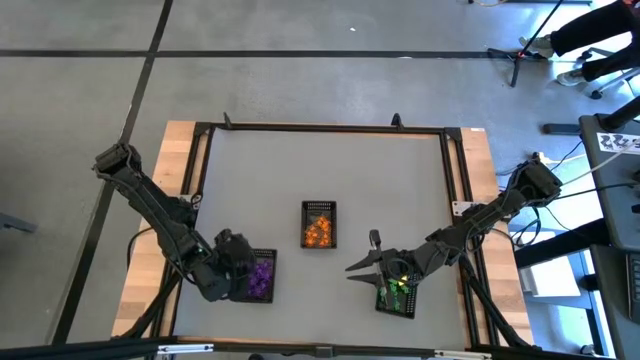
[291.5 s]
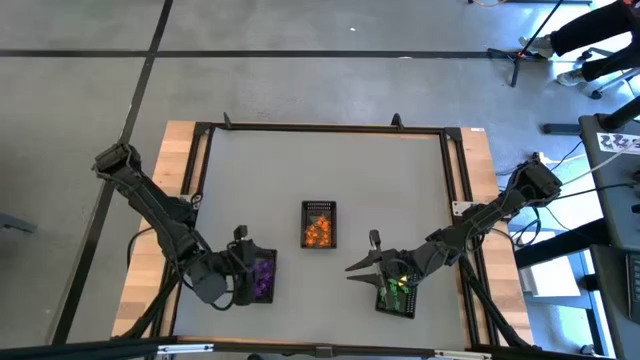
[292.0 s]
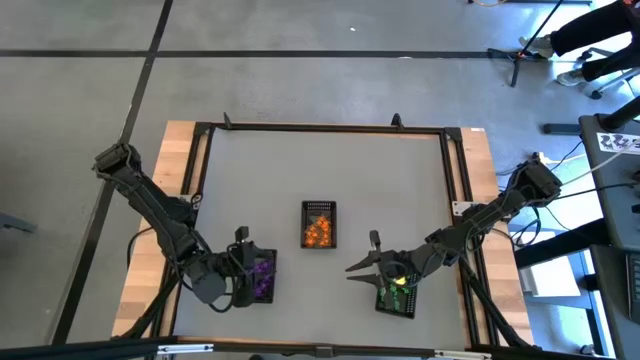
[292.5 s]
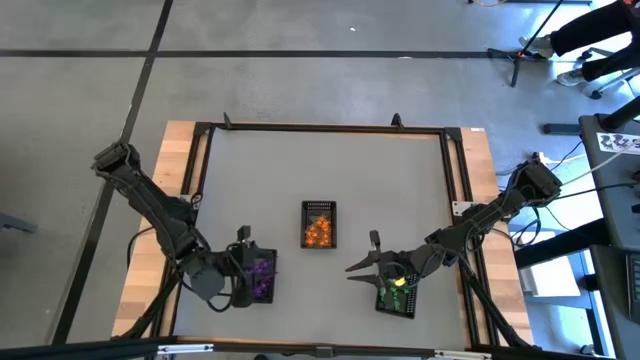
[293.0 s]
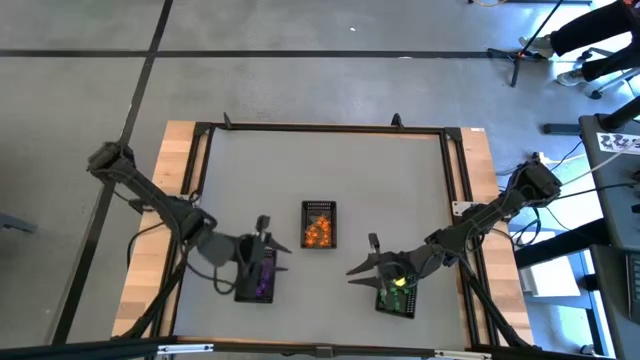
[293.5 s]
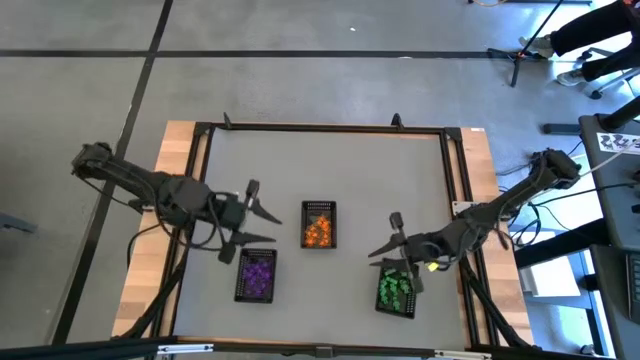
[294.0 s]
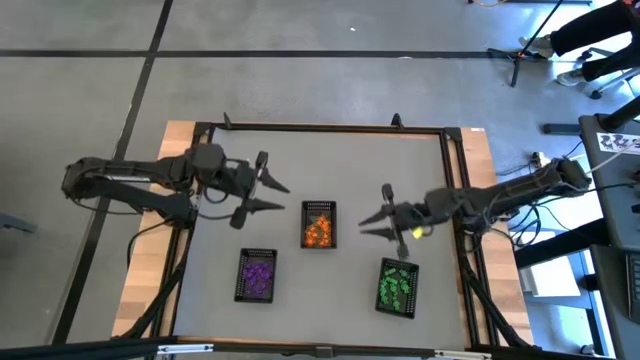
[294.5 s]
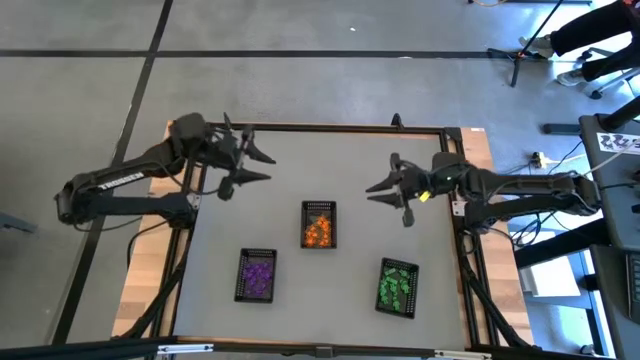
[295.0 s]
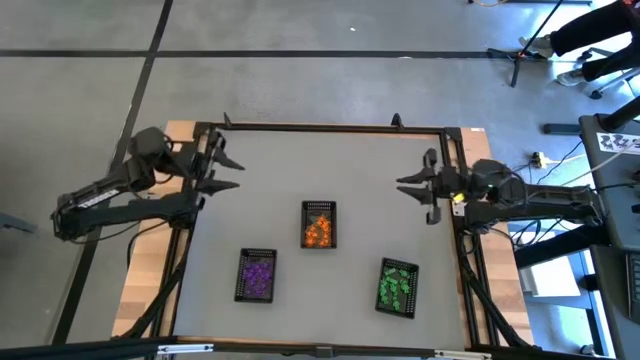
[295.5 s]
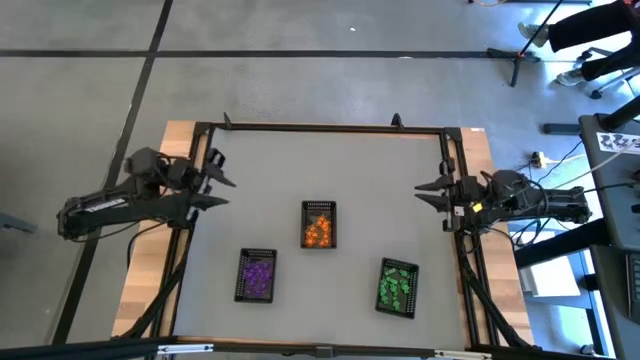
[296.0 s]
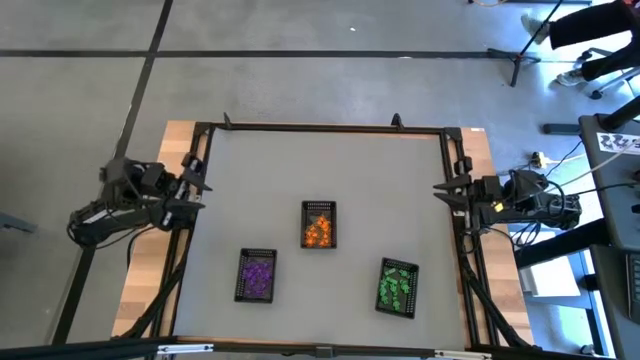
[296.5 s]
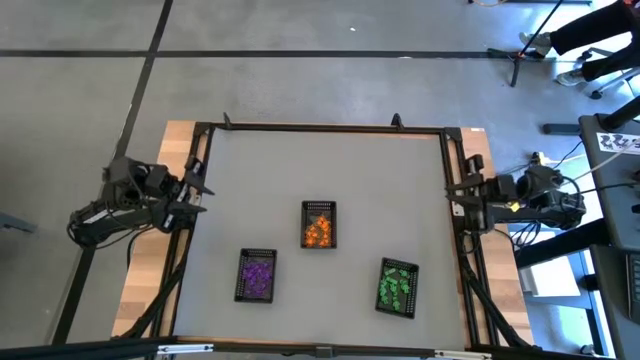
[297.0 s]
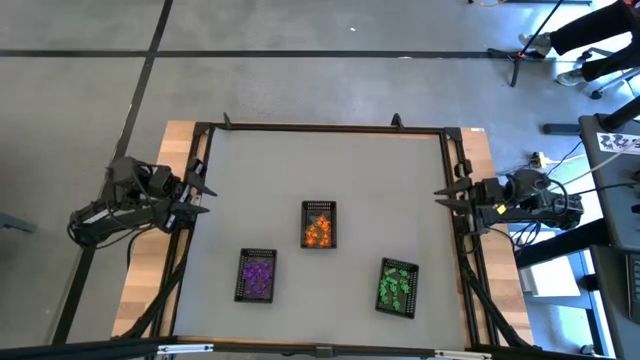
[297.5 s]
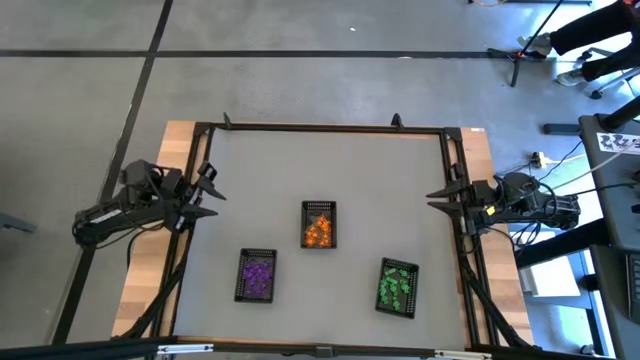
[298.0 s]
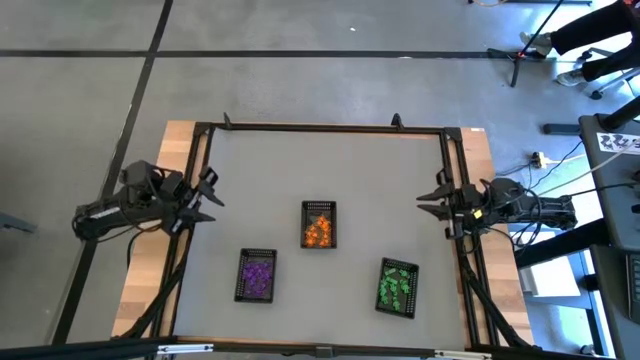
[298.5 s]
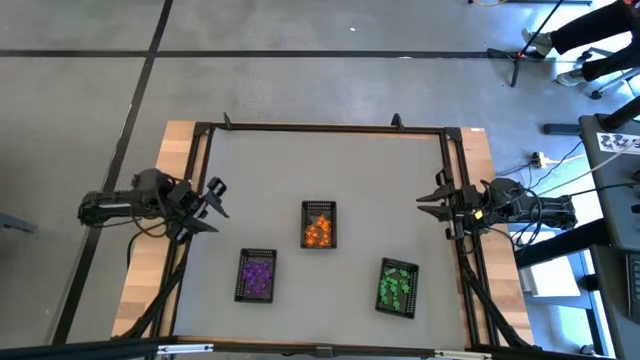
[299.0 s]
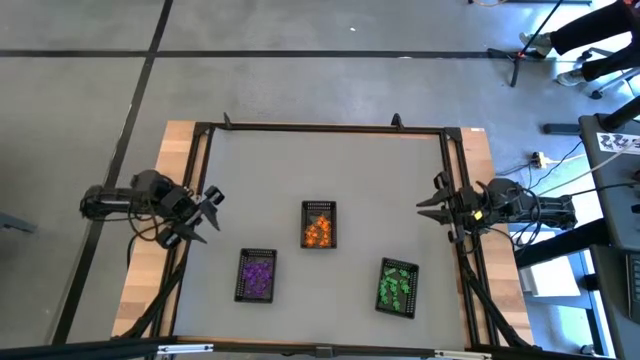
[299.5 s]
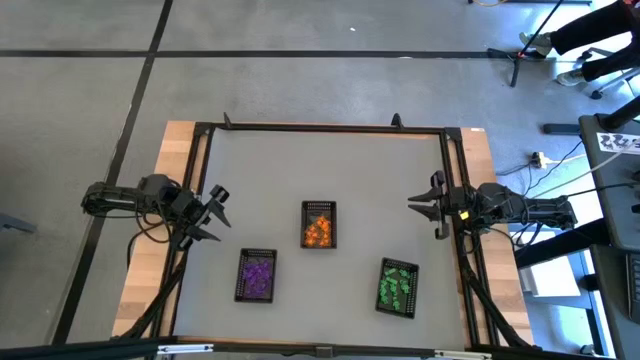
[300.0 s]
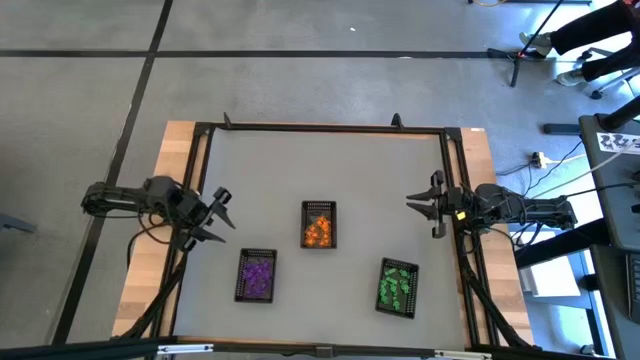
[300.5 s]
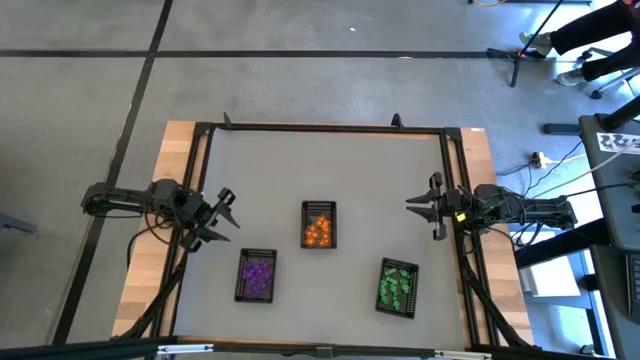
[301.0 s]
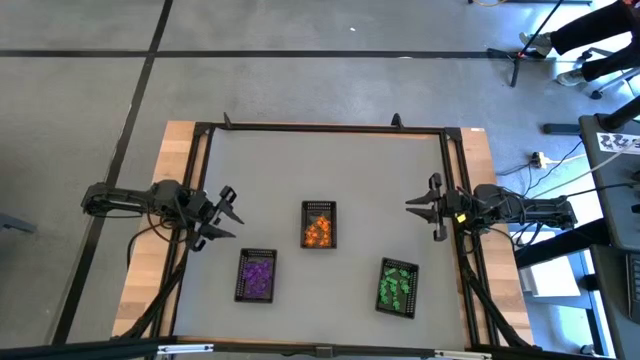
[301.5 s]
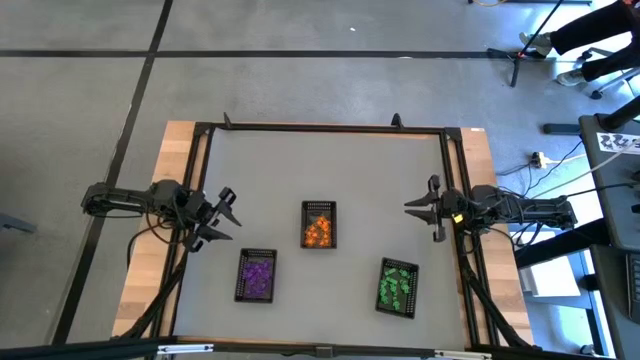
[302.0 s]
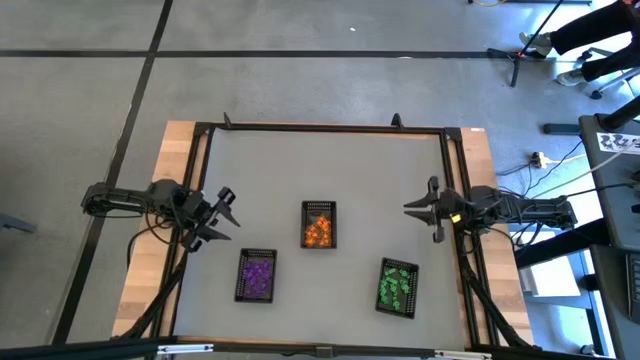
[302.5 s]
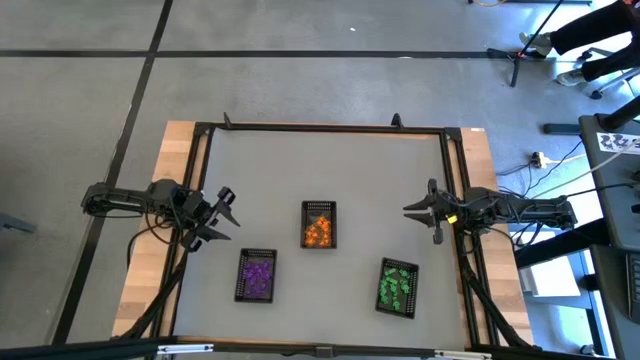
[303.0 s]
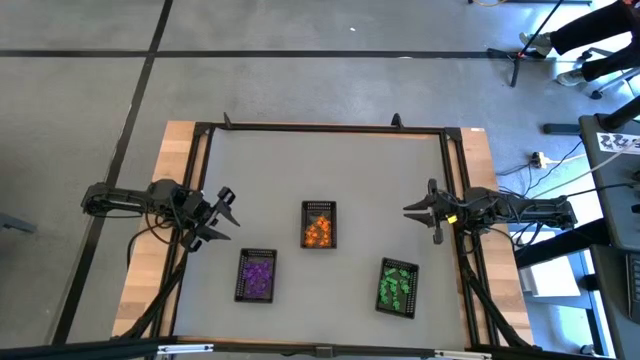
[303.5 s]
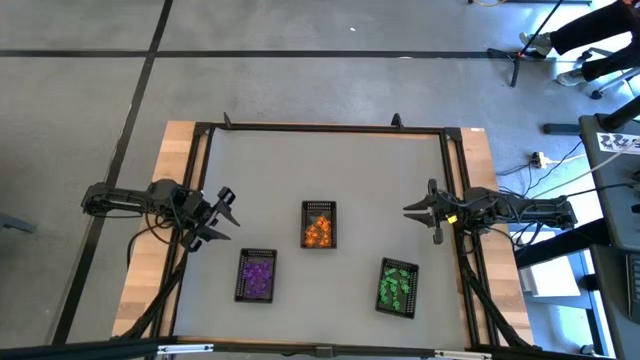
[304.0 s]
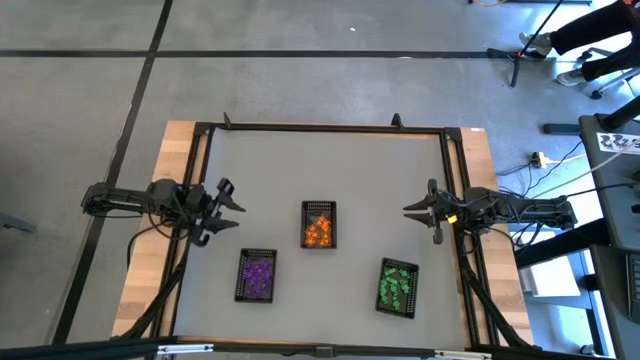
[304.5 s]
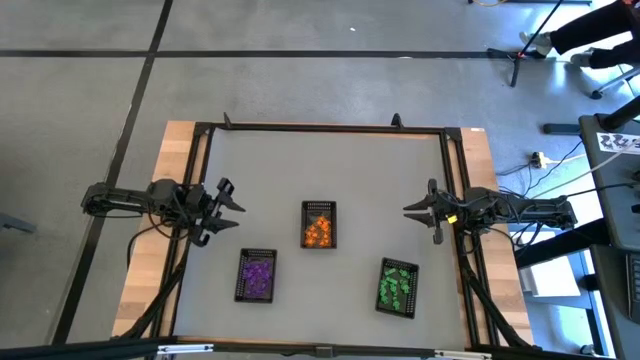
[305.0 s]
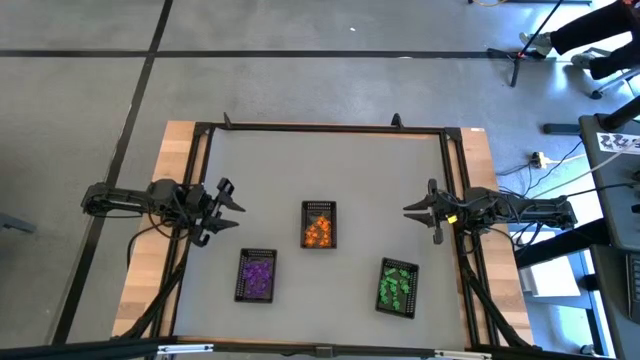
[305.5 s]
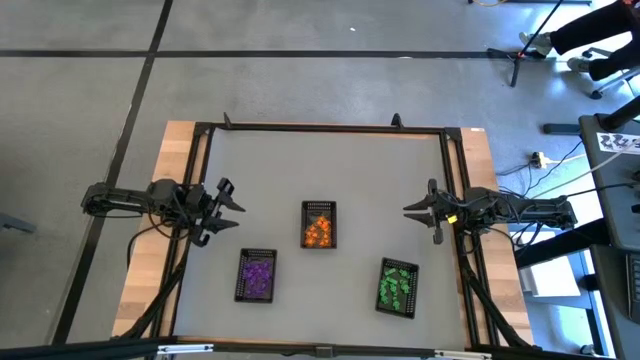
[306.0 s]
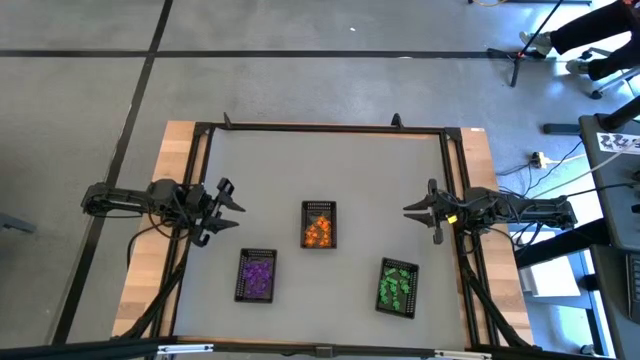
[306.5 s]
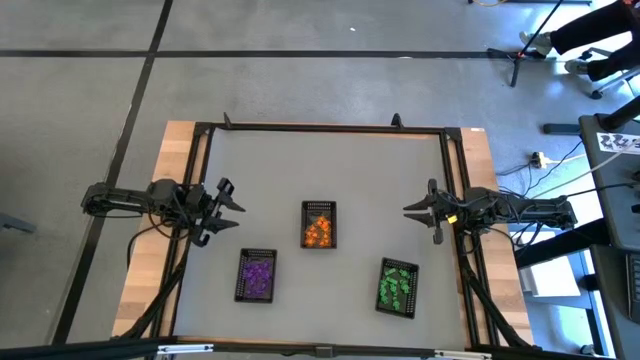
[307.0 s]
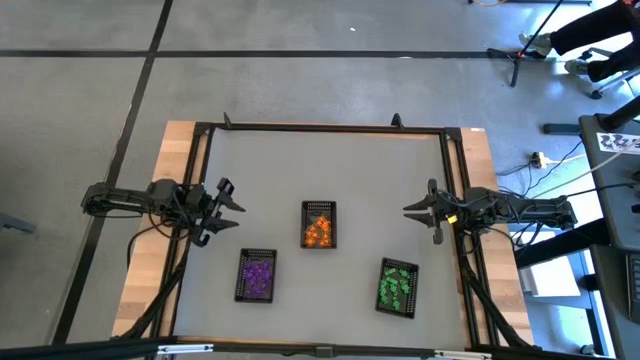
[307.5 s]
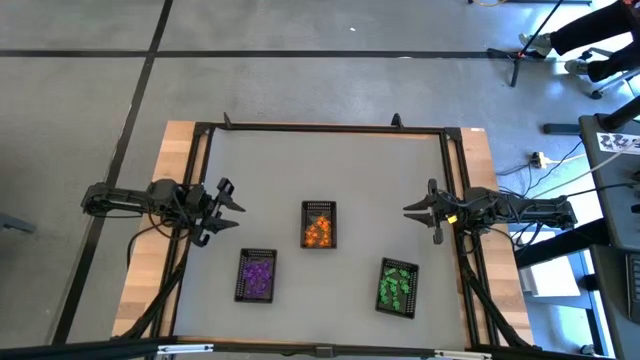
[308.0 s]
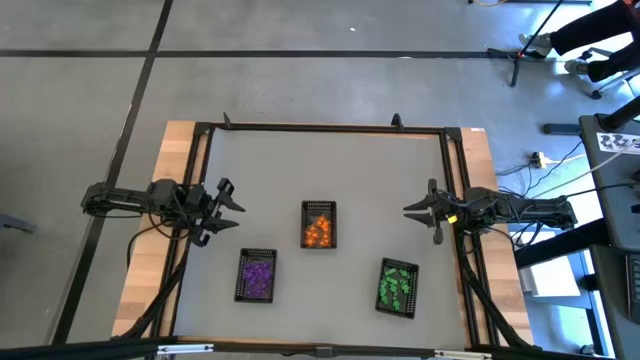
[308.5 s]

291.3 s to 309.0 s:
Task: Sort Halloween decoration
Return to Home Position

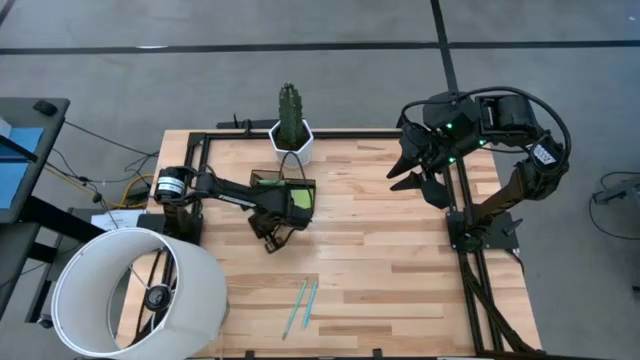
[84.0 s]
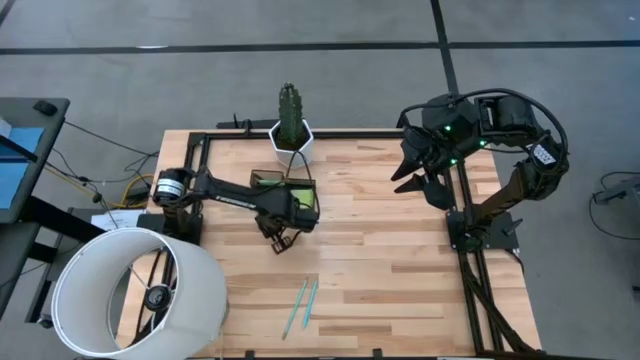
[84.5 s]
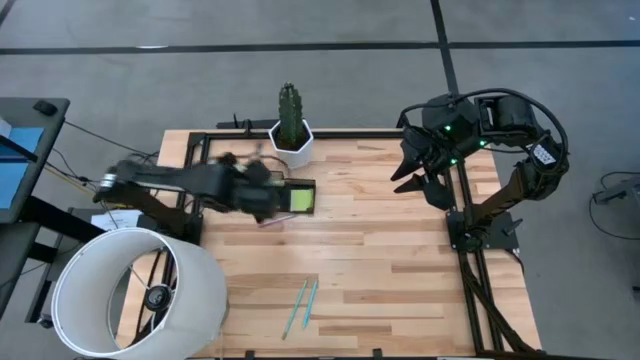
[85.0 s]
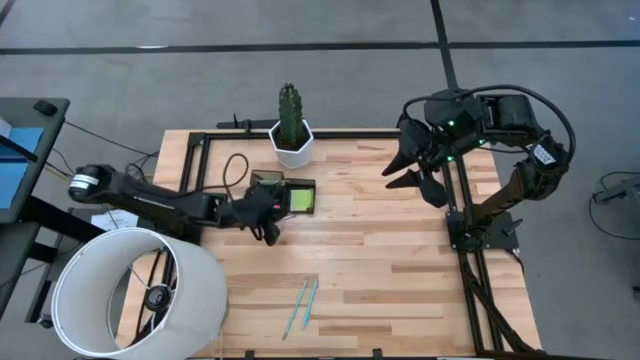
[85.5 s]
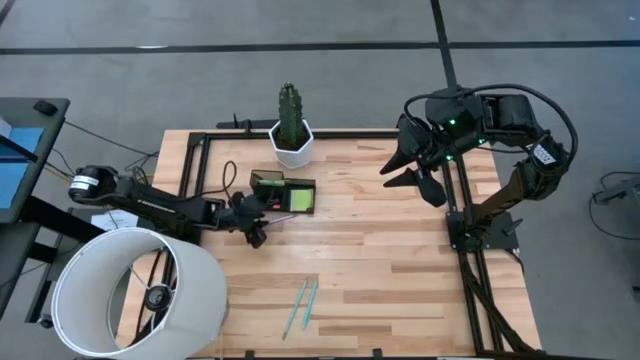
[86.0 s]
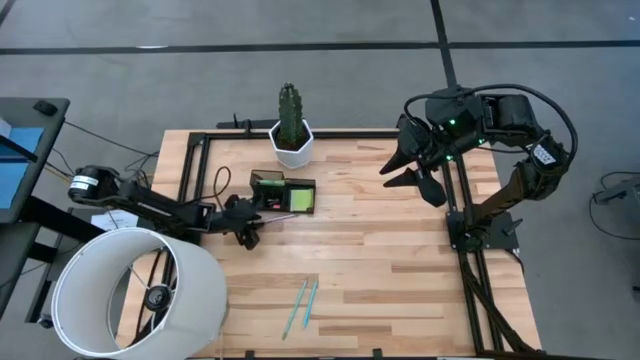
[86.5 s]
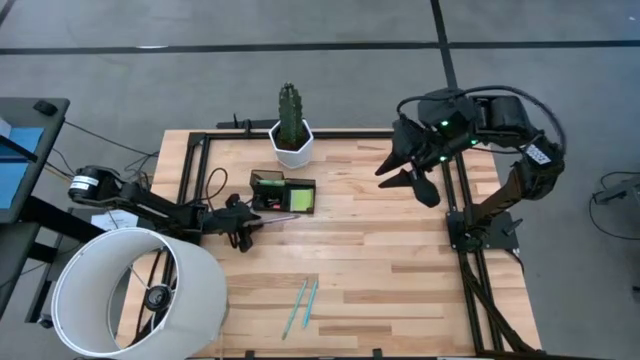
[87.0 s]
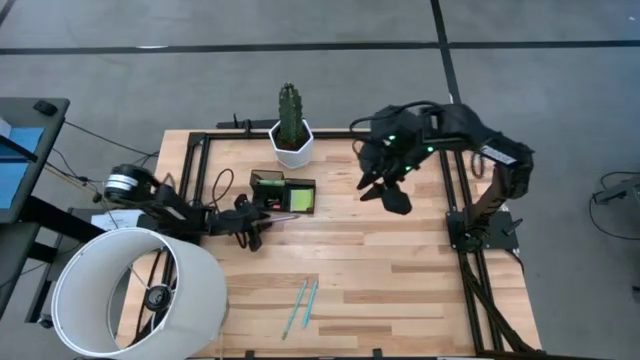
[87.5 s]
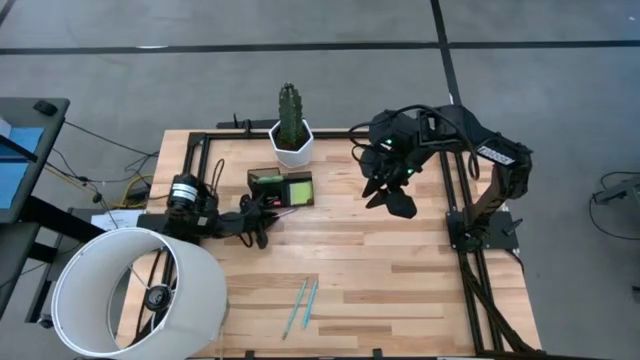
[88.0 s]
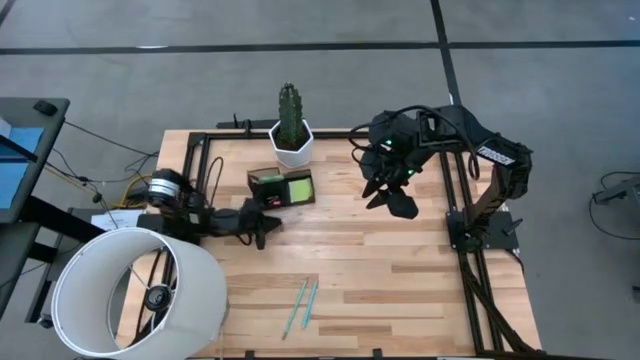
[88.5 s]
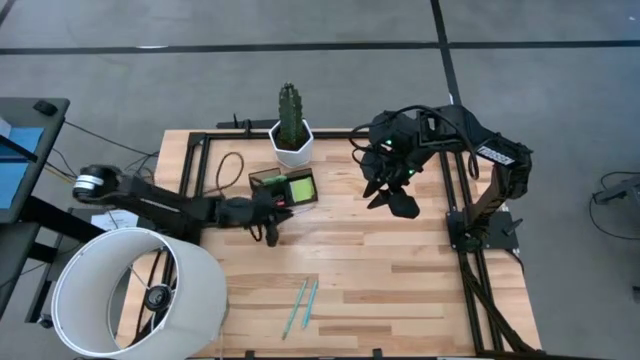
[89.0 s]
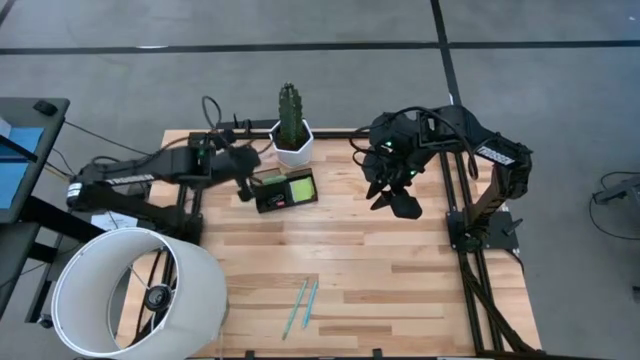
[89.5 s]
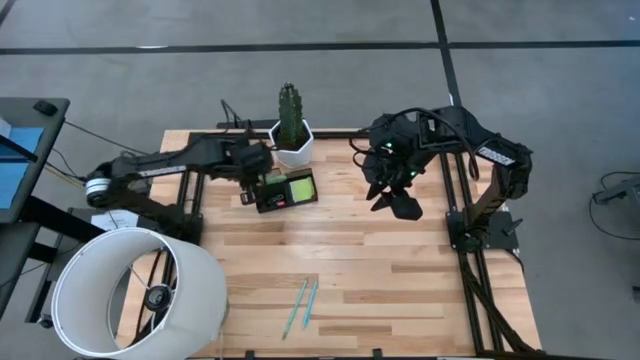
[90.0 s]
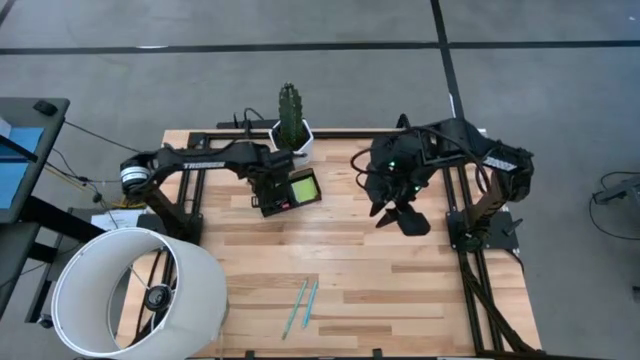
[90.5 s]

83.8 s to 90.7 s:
Task: Pick and place office supplies into organizer
Put the purple pen into the black mesh organizer
